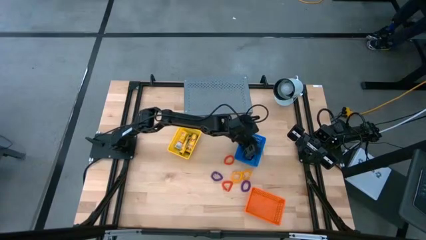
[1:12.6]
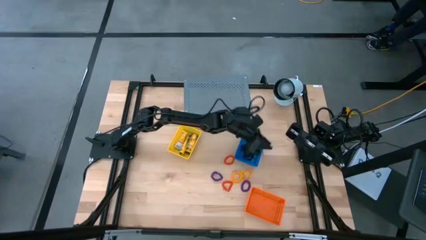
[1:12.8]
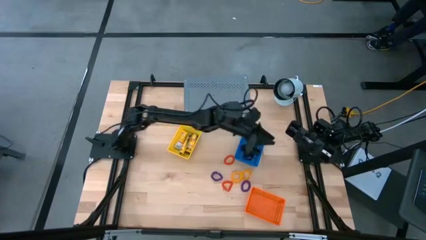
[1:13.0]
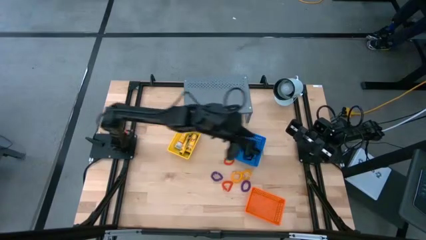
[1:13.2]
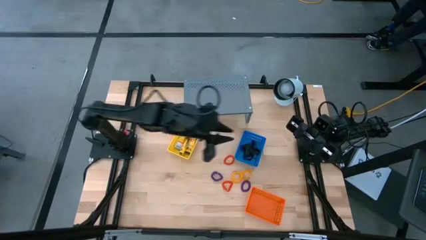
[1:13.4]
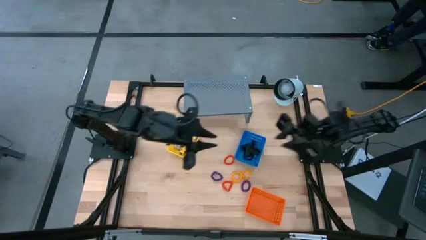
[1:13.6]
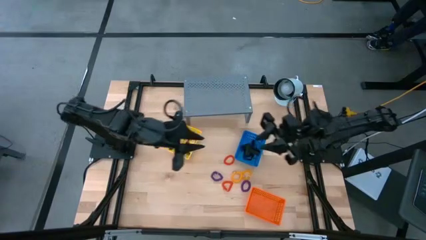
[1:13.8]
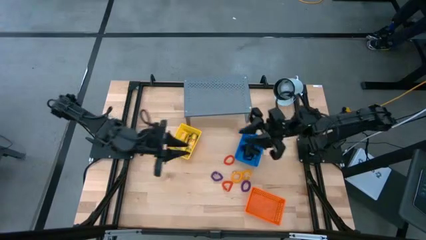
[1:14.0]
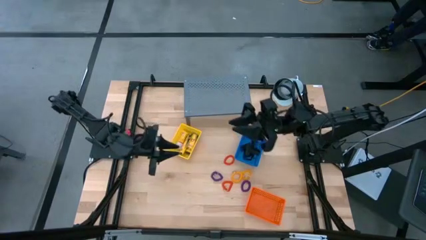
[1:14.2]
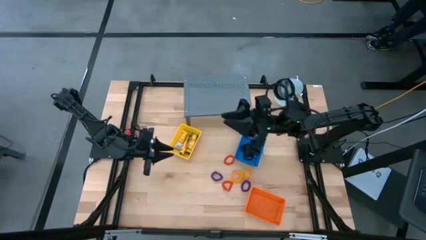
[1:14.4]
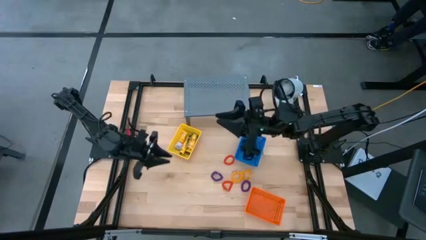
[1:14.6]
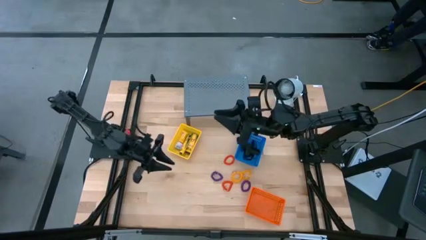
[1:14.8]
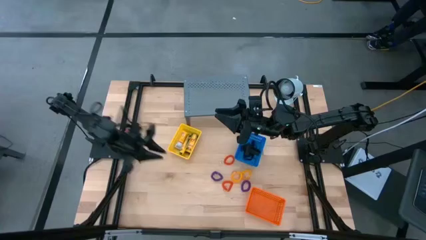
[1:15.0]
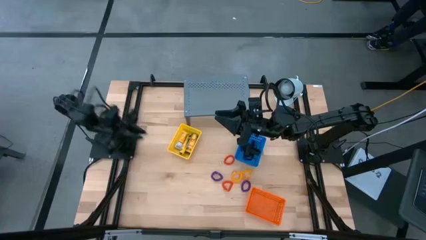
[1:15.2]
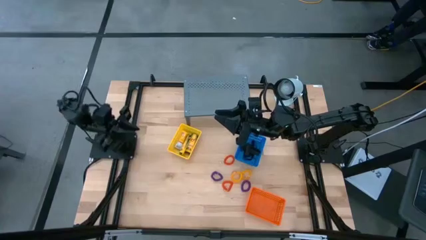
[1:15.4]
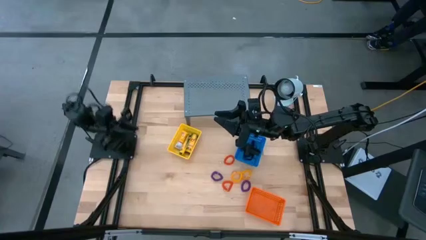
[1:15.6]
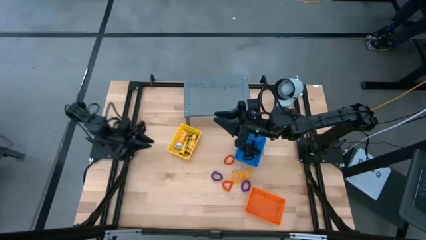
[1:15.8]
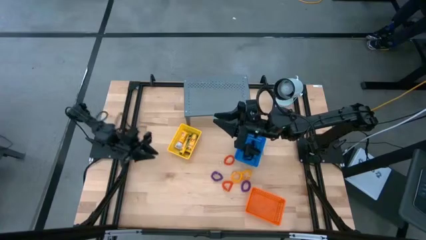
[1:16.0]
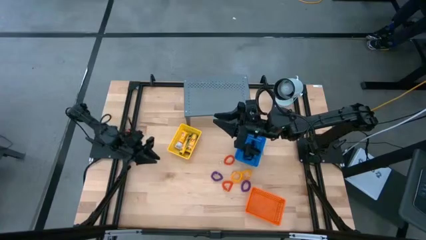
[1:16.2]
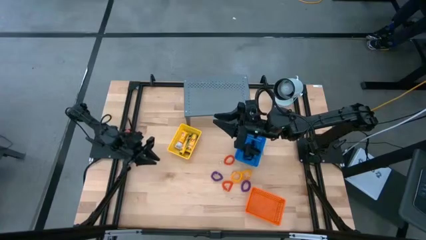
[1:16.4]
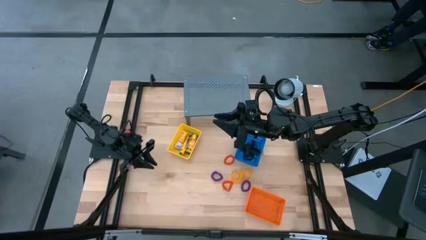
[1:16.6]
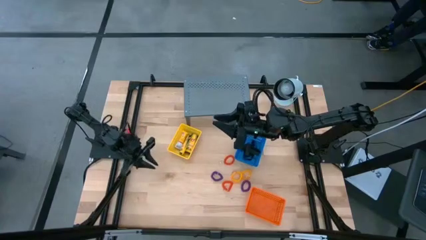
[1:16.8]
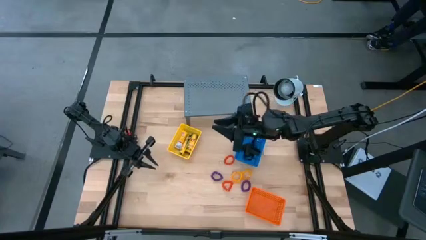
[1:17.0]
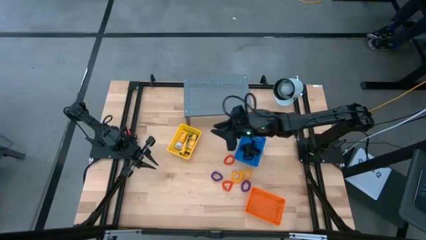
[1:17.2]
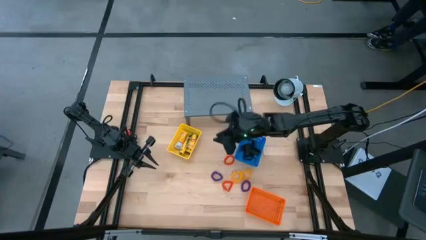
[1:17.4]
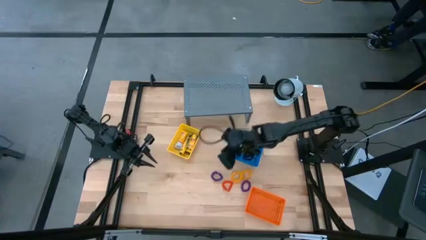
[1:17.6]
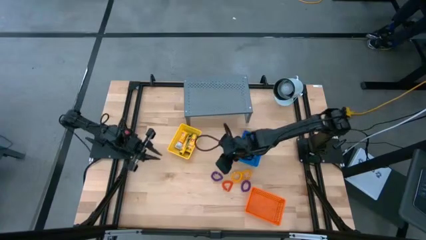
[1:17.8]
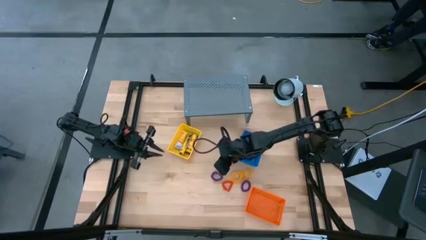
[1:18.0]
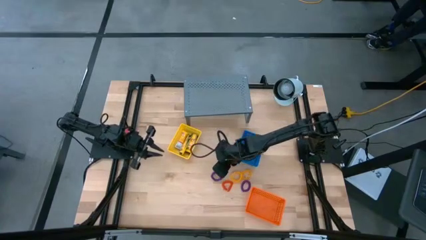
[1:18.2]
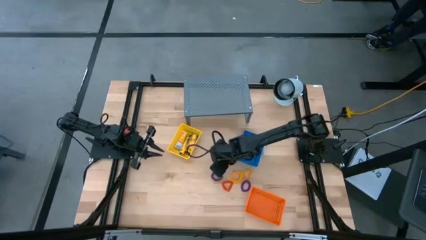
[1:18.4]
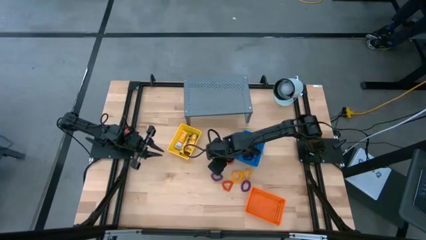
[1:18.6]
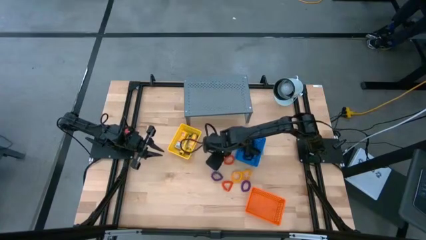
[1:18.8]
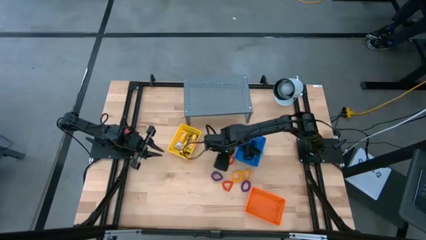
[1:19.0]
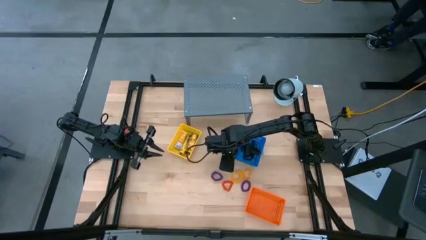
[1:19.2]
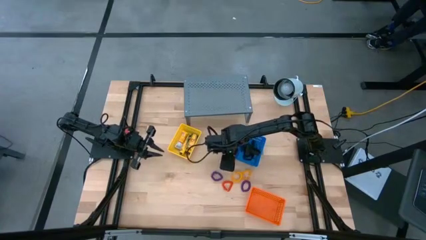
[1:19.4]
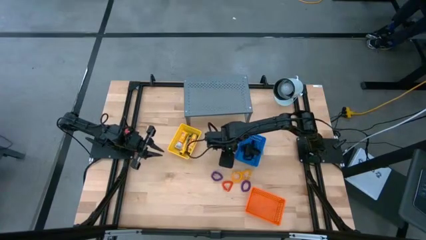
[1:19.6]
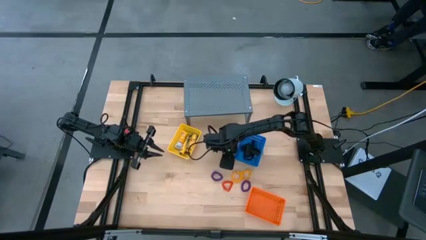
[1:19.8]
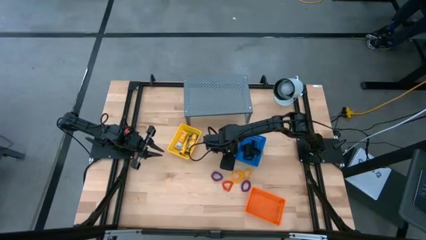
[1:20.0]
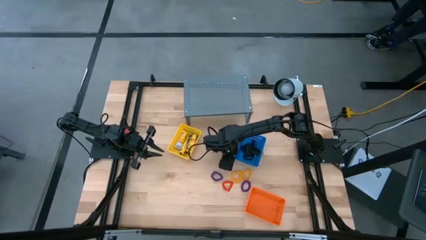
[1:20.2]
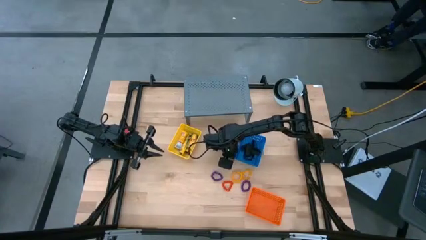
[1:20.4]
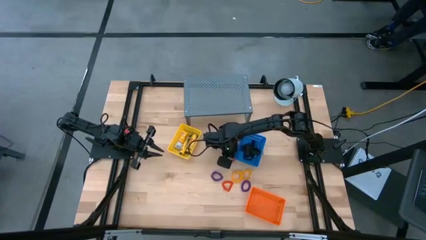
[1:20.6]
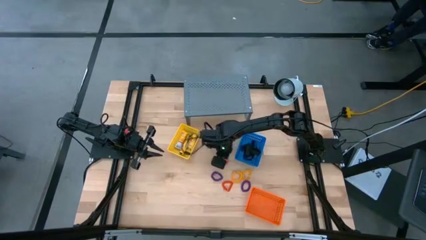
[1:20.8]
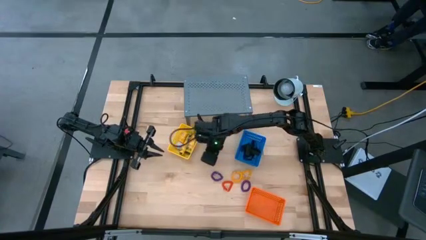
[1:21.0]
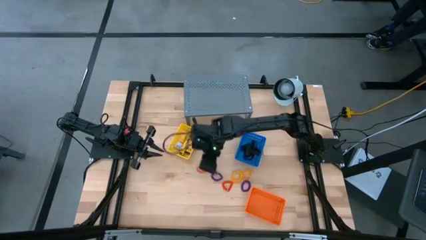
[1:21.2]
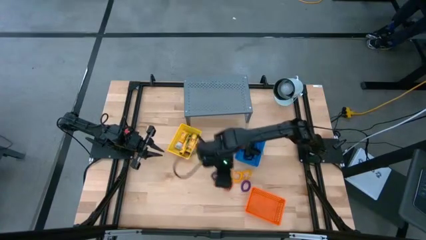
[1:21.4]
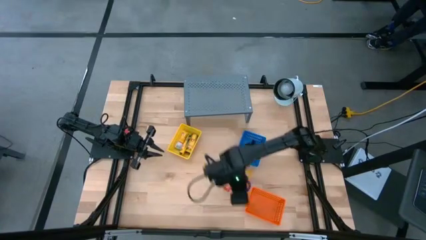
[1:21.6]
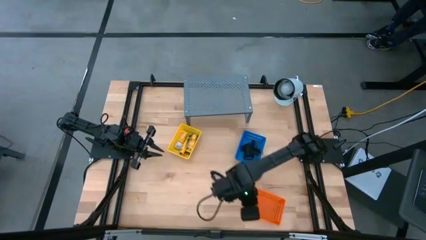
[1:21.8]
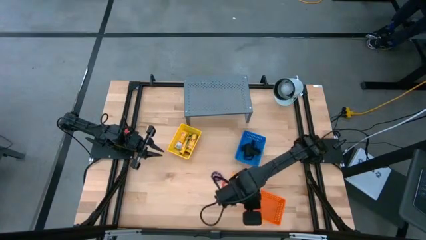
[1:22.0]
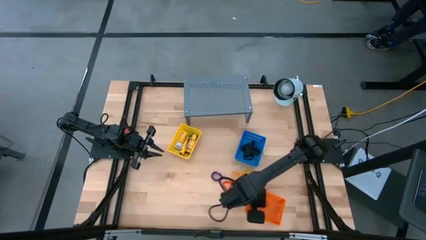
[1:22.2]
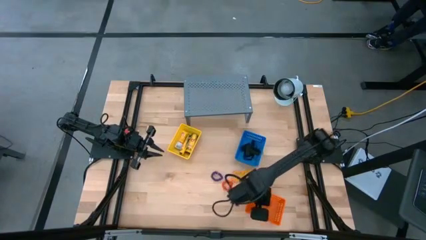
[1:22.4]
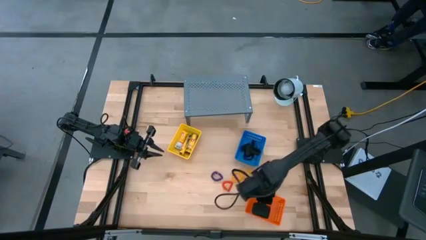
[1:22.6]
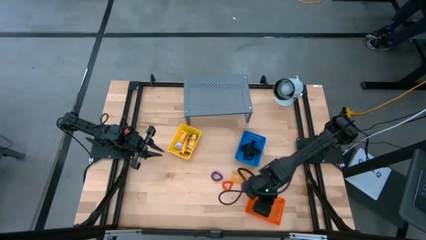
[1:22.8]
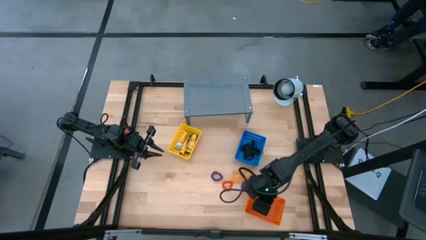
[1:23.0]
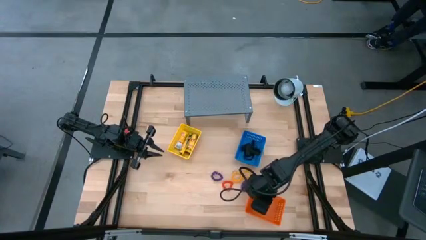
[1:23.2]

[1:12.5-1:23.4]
Task: Pick & Place Office Desk Supplies
Put the orange spring keychain into the orange bin

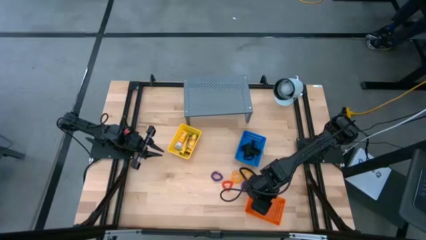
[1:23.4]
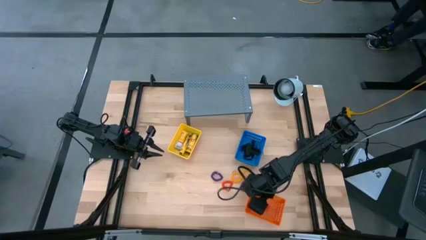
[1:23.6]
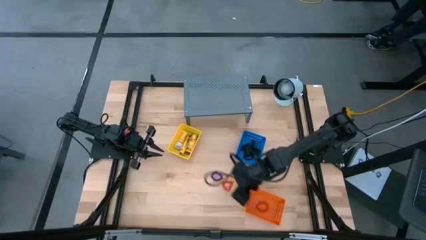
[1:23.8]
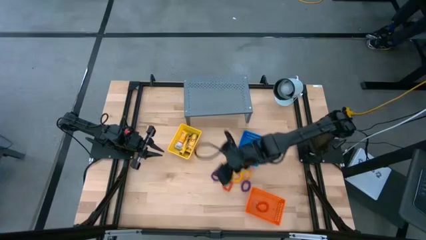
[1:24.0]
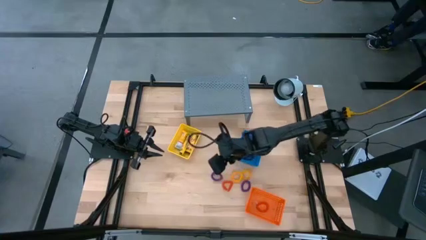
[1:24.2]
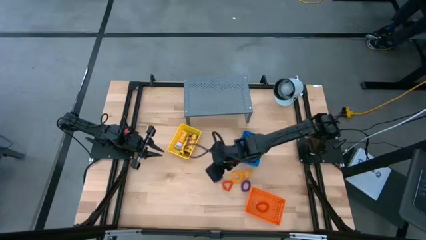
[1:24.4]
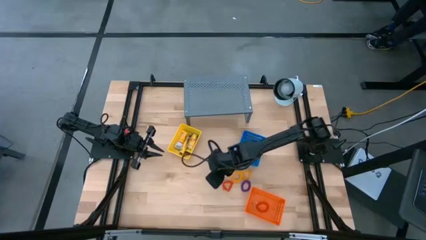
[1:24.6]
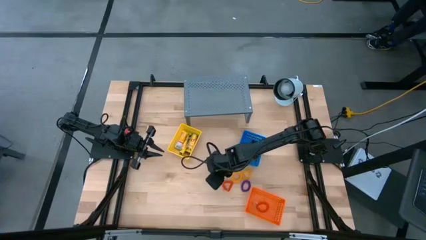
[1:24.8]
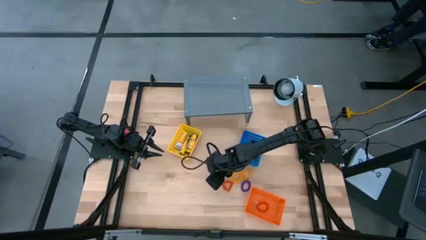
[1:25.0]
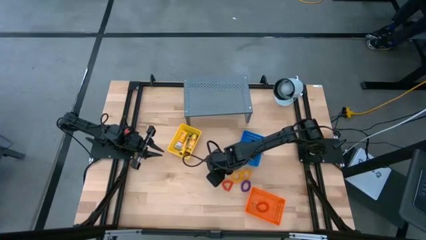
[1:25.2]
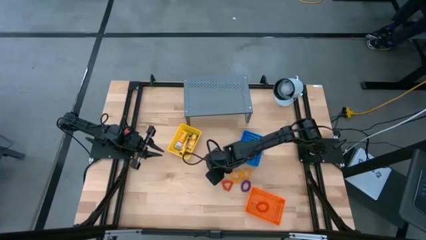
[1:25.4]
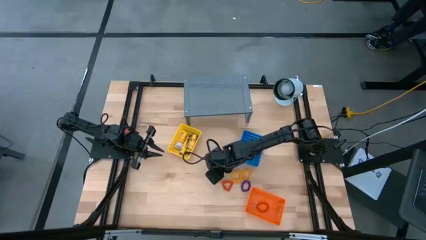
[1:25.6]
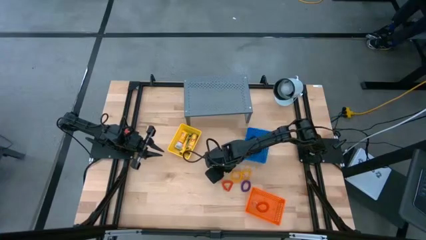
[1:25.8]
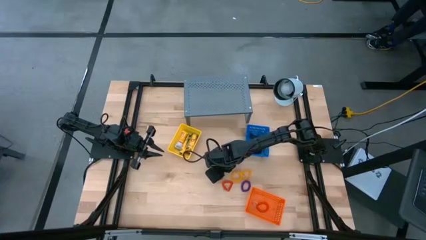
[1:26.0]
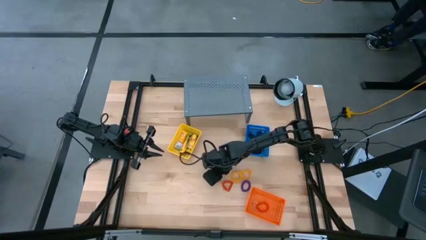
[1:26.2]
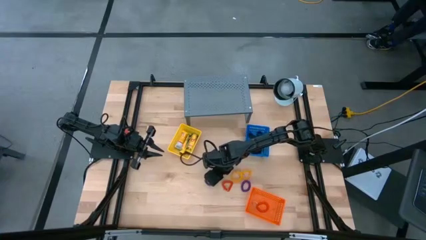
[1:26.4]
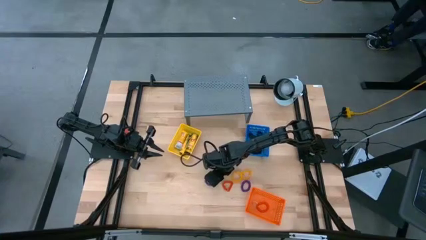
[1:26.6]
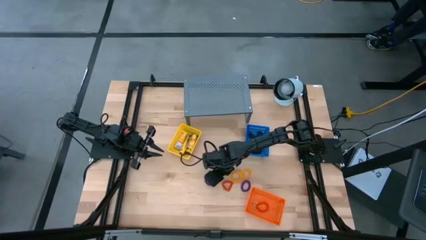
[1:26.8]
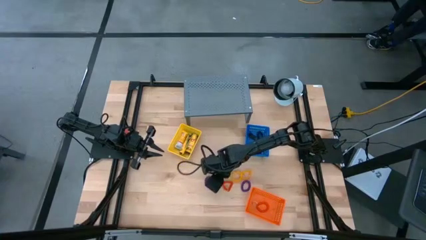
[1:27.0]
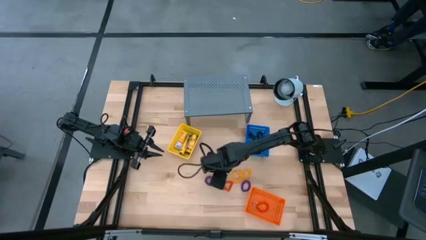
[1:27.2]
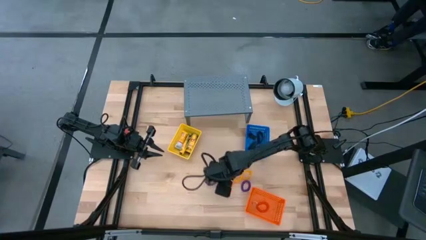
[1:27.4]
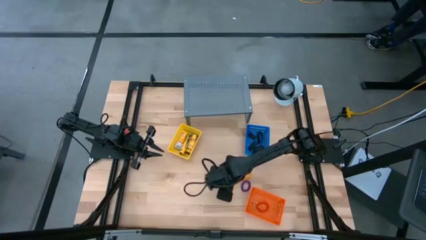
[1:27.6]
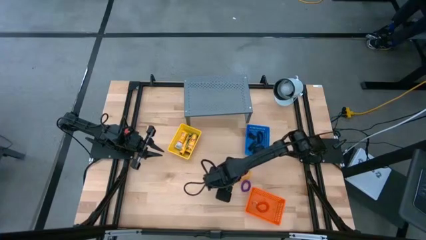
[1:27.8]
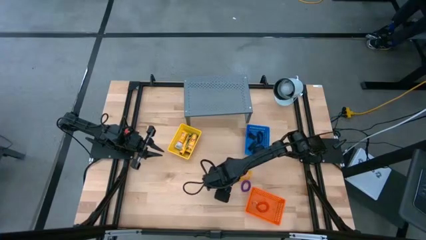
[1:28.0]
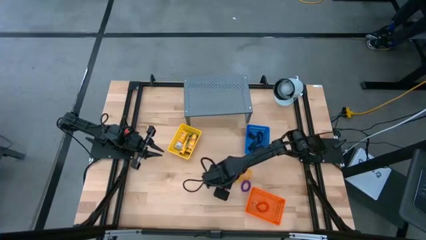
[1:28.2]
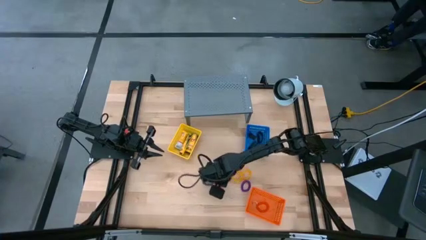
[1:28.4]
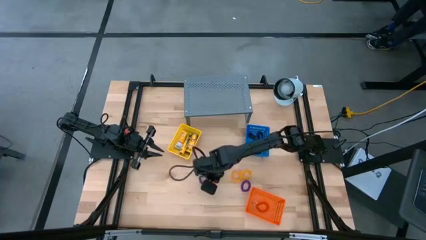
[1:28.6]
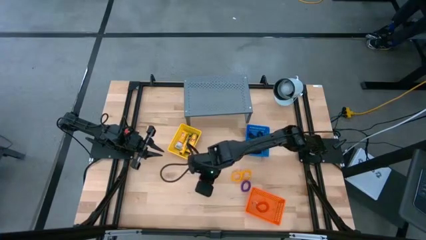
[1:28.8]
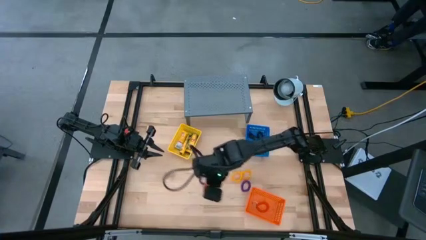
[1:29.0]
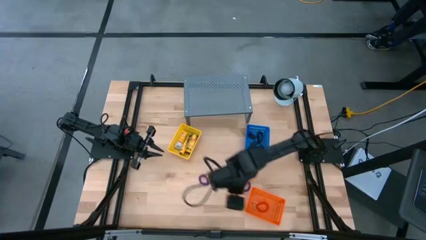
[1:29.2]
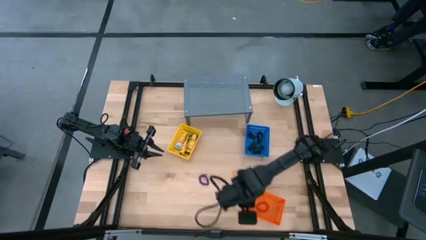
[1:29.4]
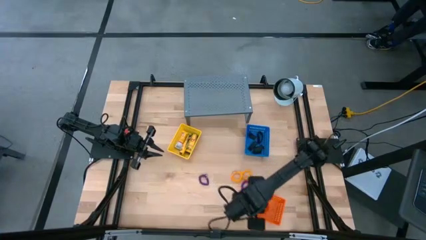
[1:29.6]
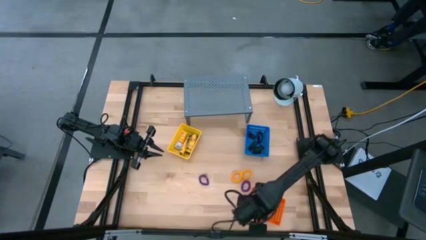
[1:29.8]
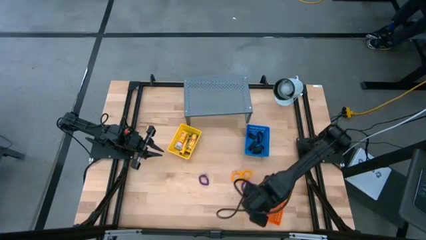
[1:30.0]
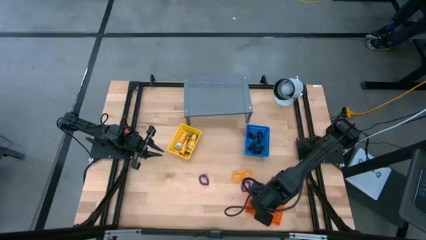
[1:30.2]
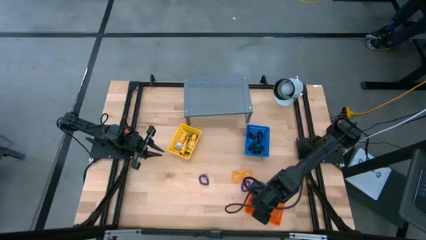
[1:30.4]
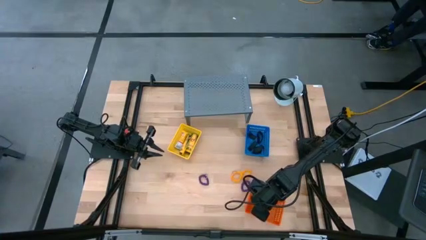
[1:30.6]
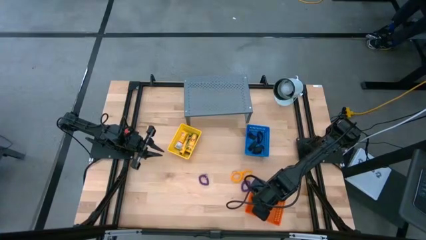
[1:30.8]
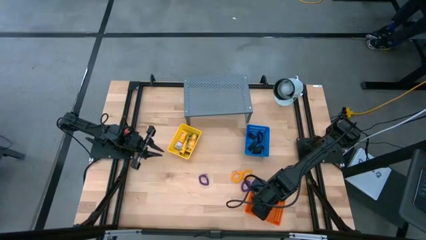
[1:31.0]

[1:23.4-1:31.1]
Put the orange spring keychain into the orange bin
